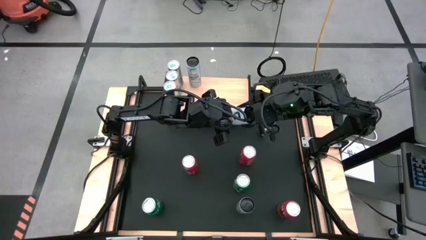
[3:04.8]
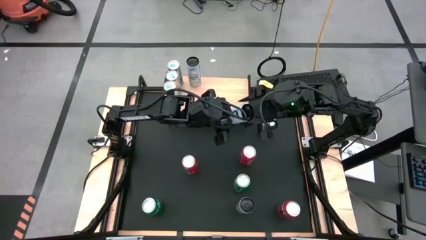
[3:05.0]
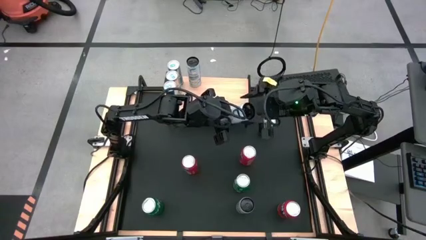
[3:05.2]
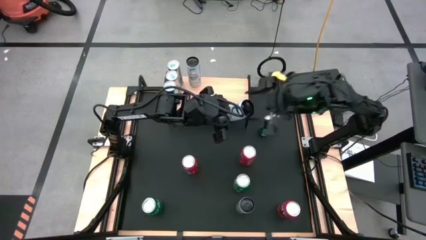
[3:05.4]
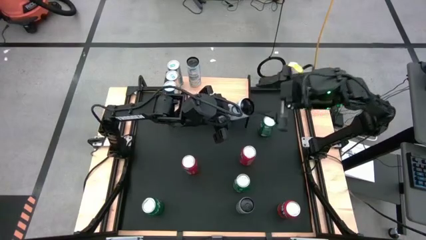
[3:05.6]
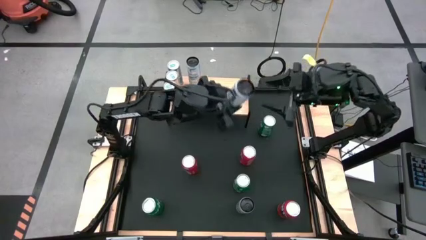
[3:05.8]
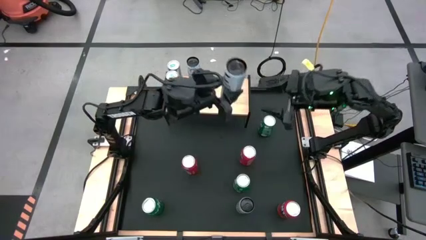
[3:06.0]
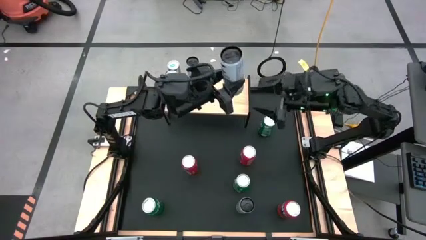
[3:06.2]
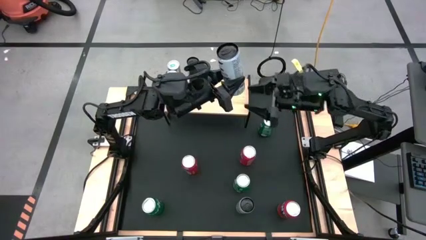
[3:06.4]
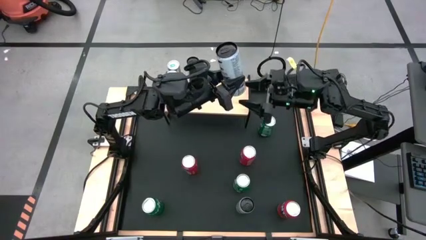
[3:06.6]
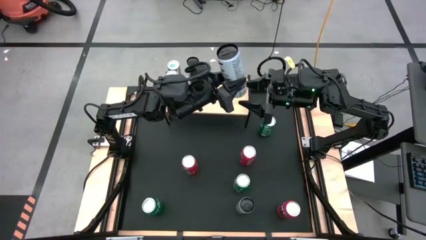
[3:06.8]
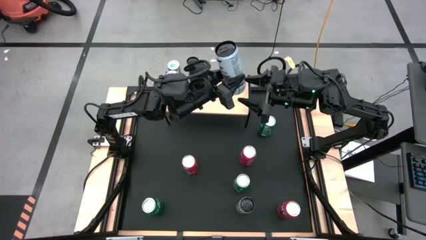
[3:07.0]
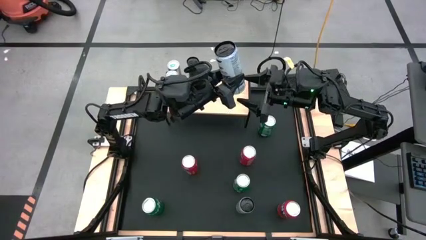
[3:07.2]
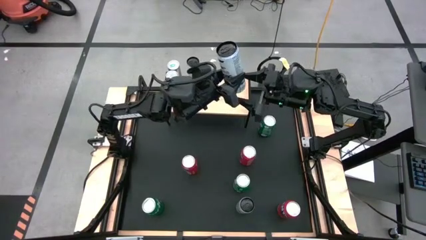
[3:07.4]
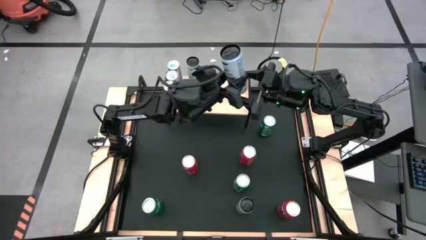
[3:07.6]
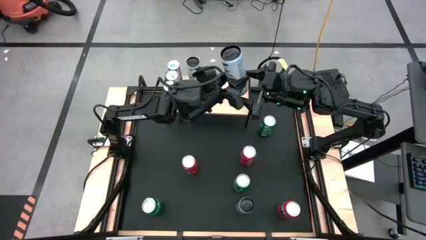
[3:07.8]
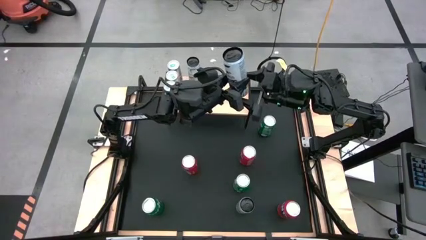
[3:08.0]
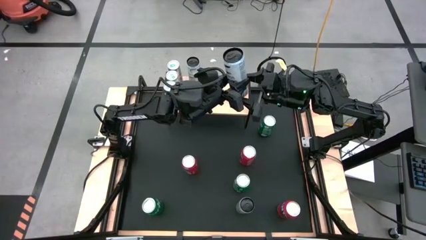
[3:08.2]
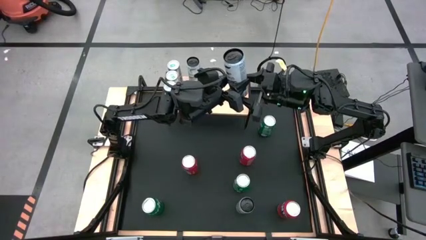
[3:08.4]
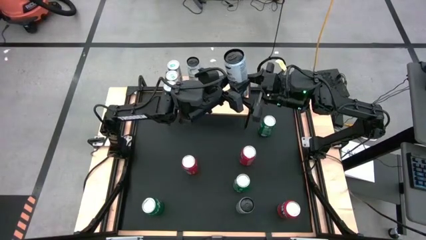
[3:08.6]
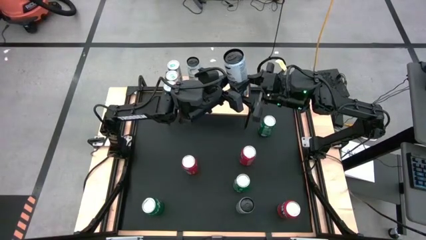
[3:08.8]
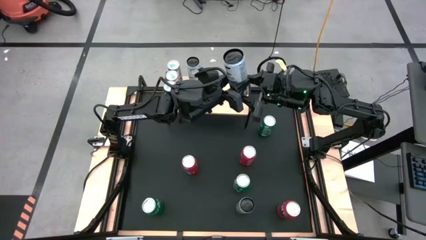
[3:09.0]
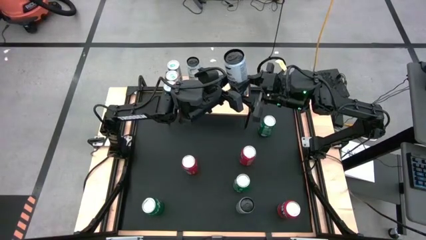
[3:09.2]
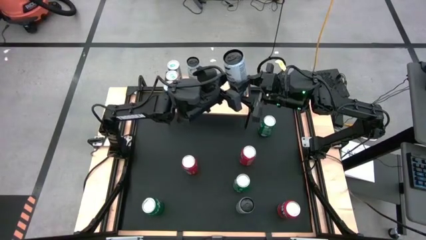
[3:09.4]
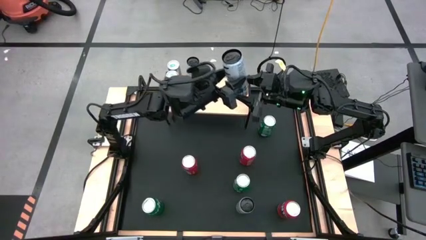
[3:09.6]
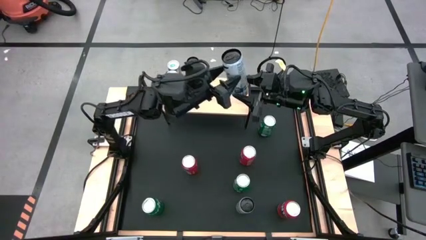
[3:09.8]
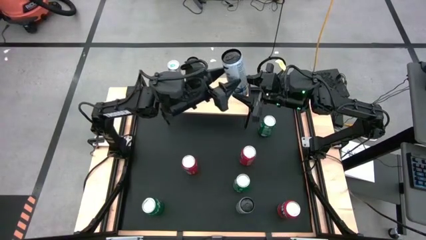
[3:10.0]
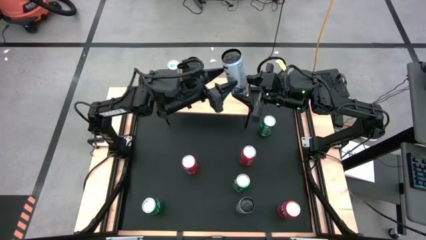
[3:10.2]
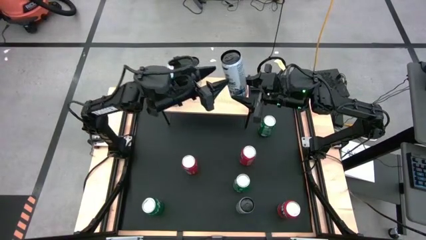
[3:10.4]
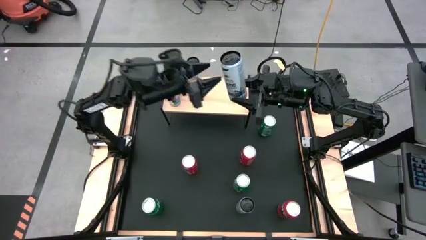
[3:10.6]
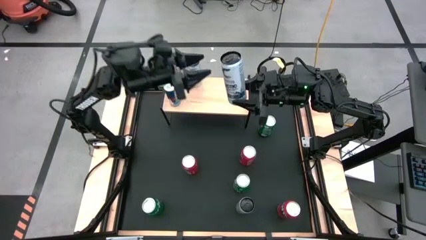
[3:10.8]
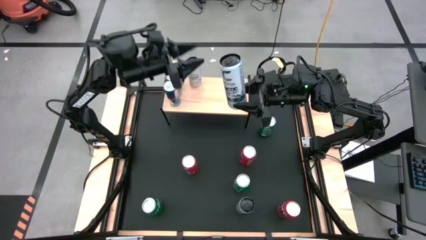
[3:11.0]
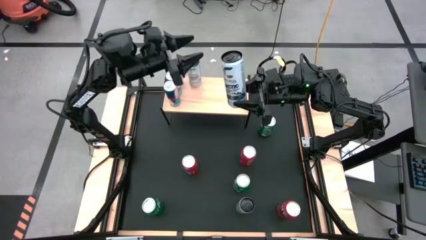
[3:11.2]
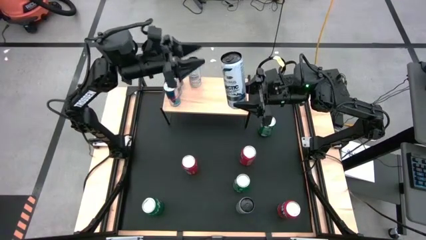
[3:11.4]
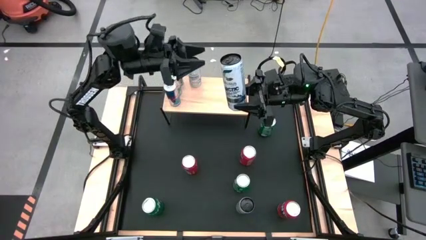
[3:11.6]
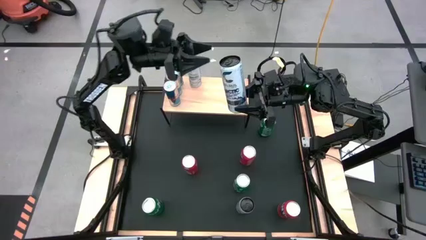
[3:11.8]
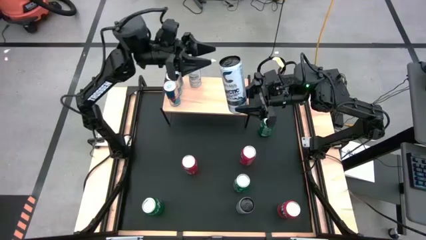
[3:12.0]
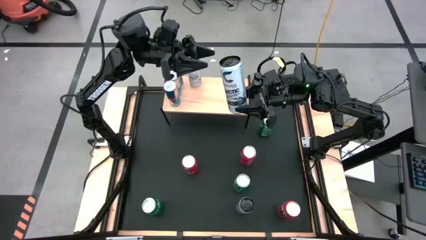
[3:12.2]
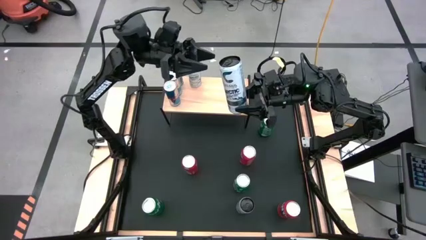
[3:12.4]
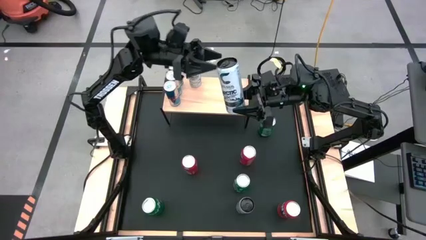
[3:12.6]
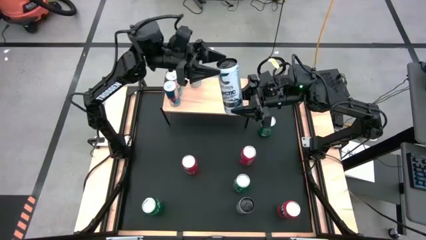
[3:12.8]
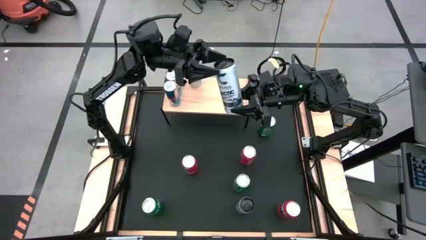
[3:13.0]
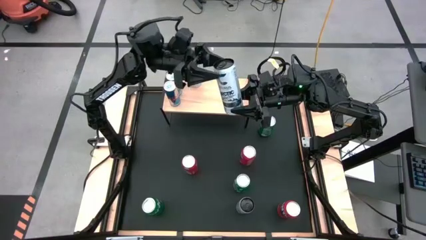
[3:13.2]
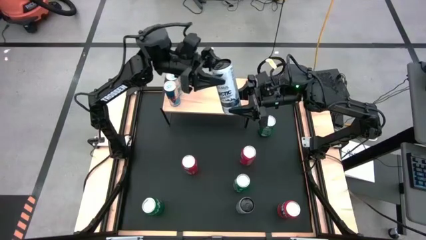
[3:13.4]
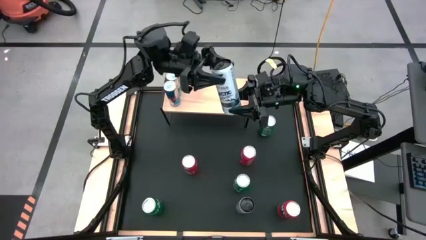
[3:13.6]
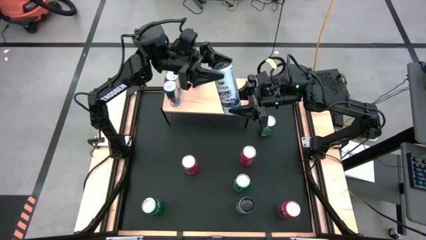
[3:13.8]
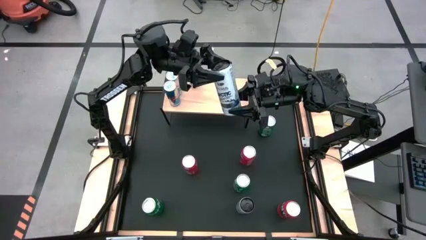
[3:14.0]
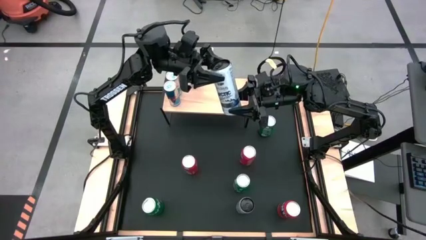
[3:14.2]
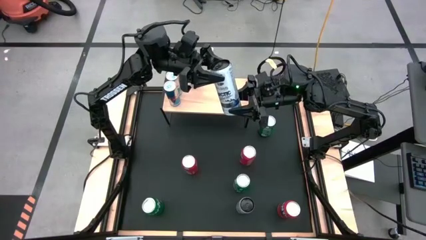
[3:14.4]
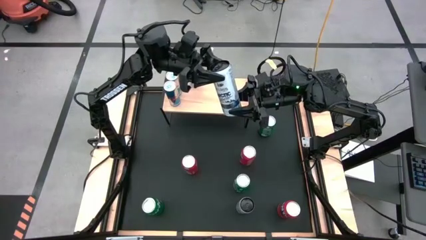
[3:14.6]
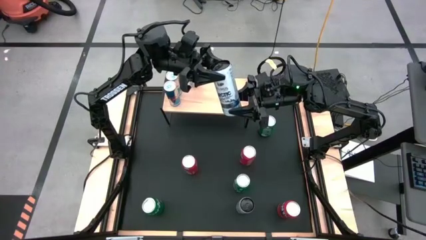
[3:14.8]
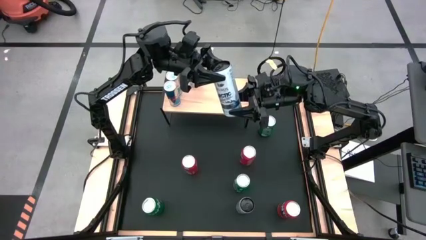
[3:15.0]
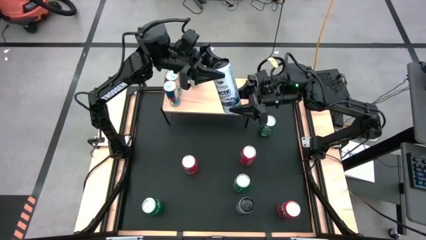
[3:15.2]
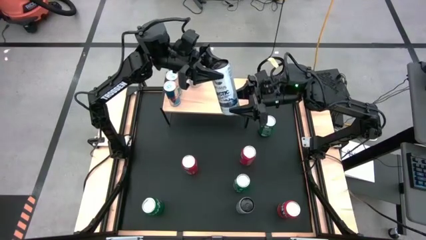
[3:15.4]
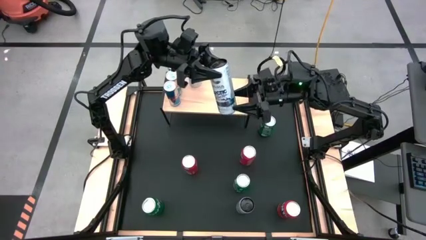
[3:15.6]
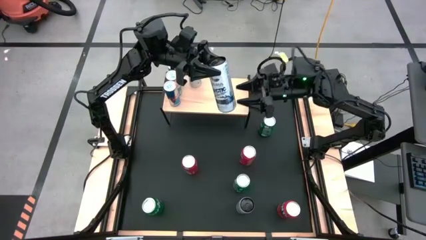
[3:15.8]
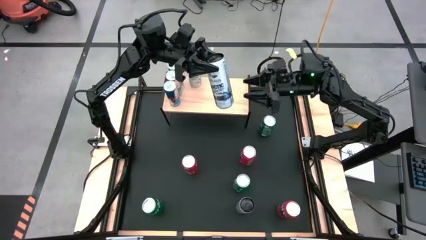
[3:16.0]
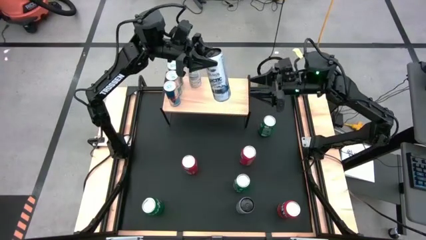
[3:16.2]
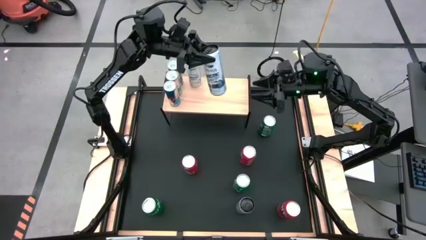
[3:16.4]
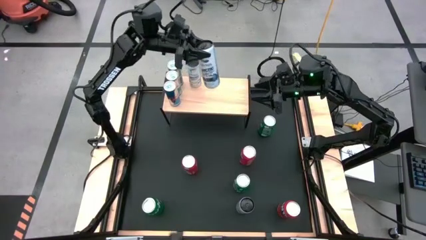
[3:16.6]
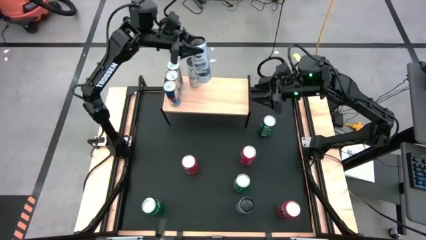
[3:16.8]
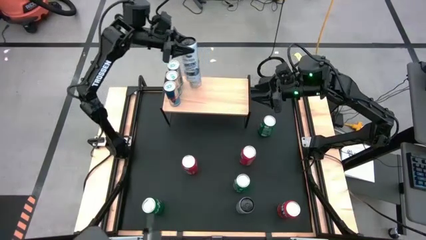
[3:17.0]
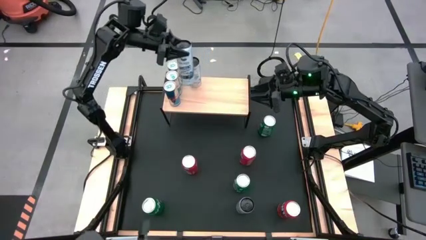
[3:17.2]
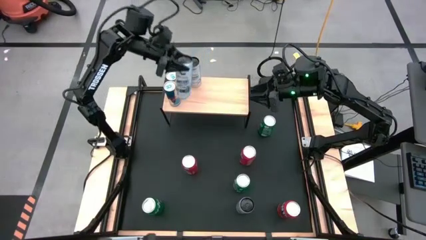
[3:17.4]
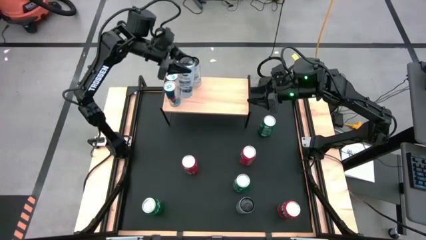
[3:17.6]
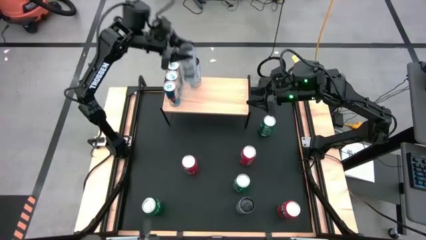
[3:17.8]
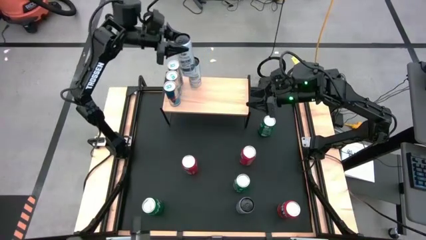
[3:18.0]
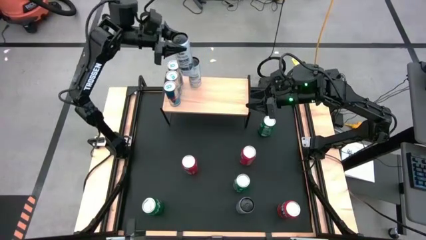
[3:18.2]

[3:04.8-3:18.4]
Task: Place canned beverage on shelf
Put the top white-blue soda can on the shelf

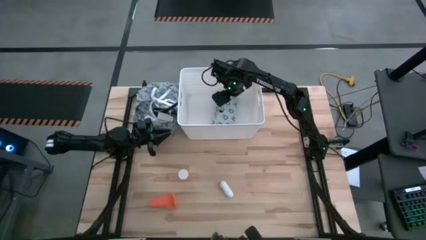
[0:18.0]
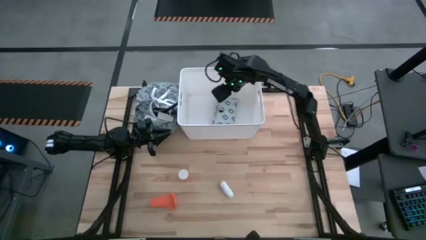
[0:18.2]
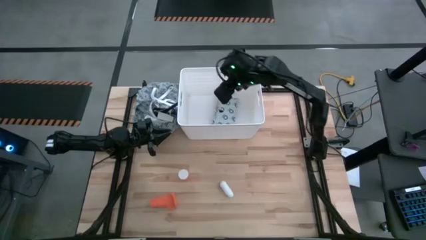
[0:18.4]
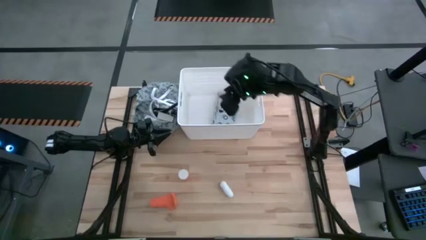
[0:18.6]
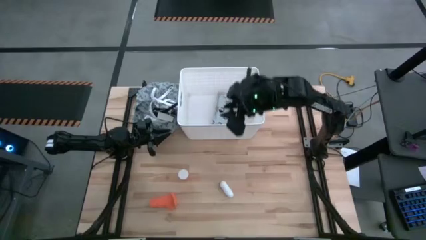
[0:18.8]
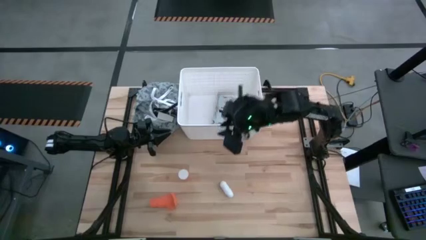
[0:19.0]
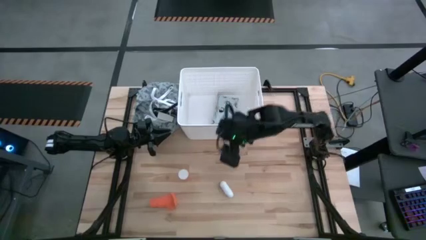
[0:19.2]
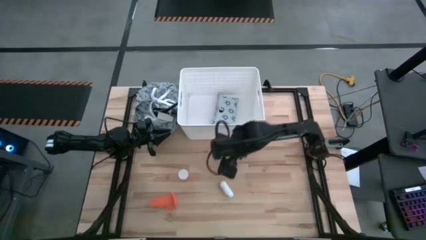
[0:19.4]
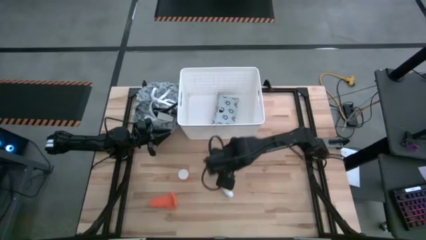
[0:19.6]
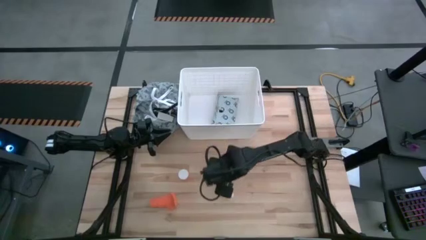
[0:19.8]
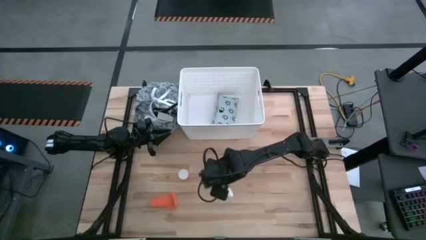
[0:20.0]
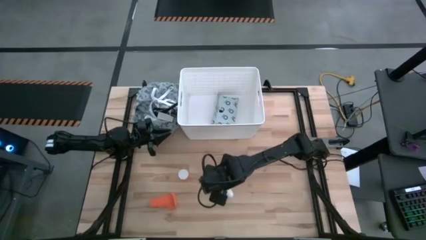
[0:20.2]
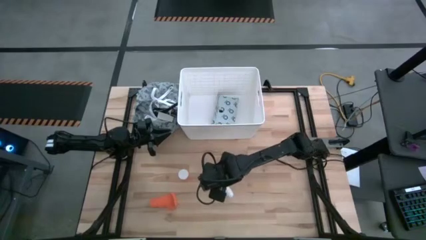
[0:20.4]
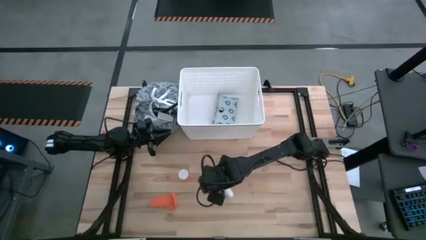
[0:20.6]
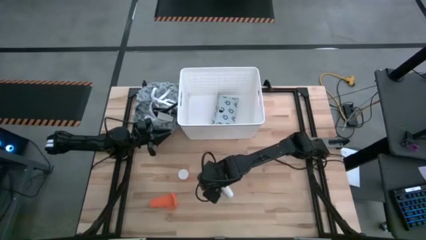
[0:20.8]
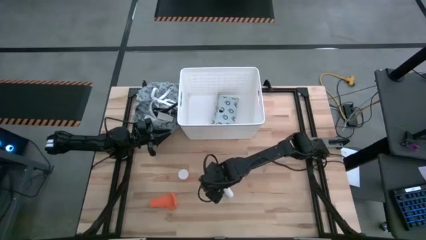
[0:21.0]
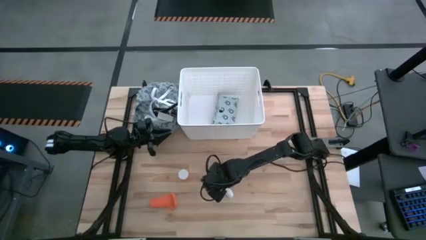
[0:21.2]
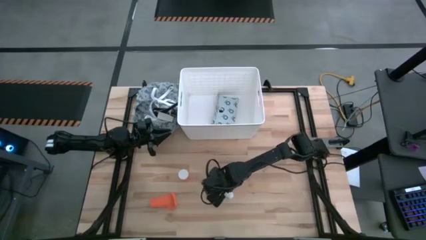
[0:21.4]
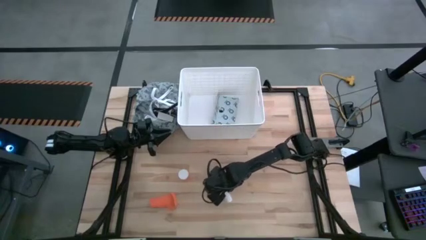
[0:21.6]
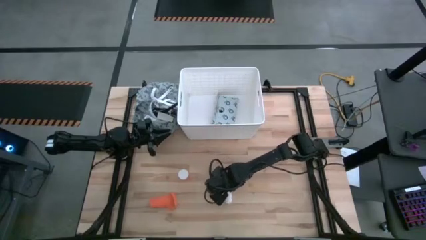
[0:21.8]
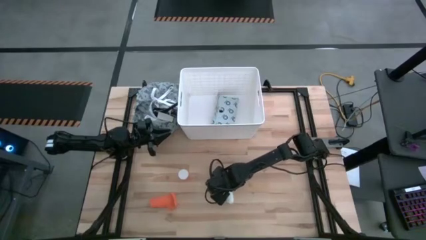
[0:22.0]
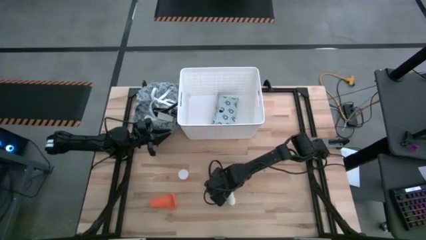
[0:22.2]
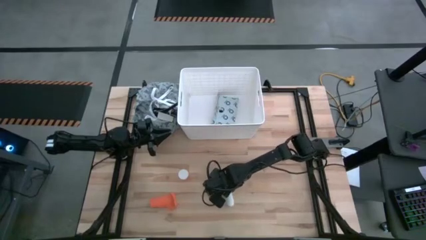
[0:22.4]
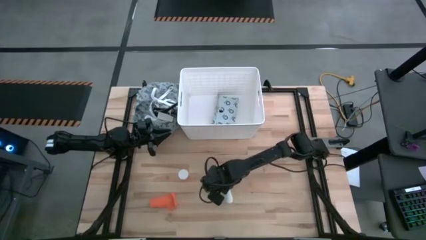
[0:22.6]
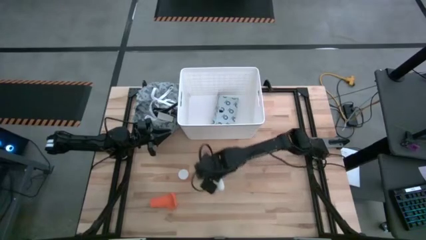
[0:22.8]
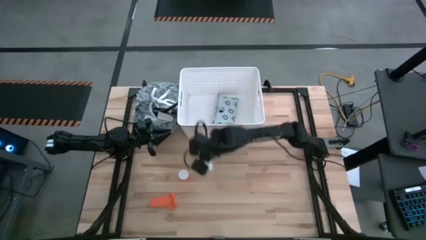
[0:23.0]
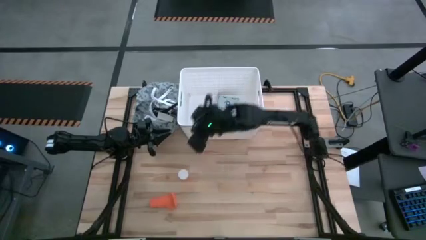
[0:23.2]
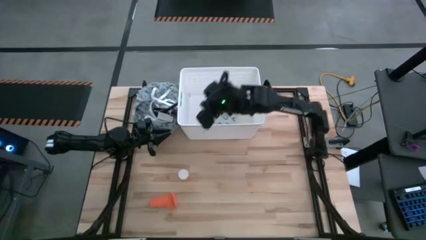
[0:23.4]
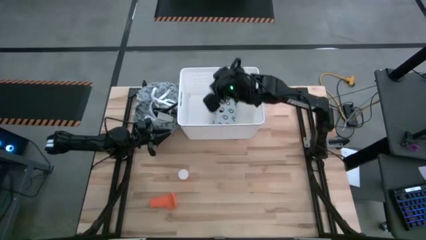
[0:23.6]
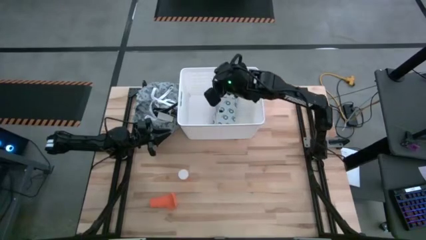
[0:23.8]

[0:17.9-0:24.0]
Task: Pick & place medical supplies in basket/bin
Put the white bandage into the white bin
